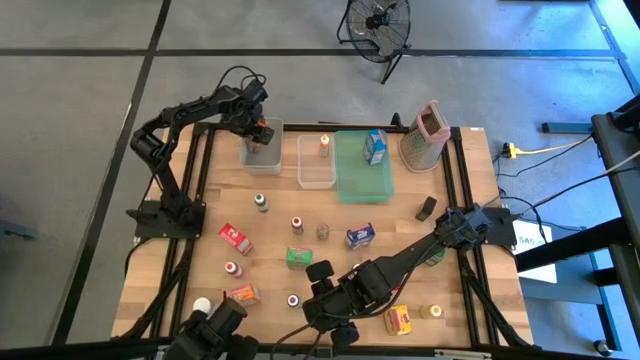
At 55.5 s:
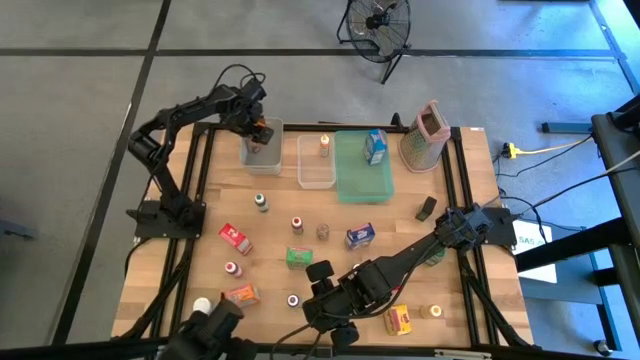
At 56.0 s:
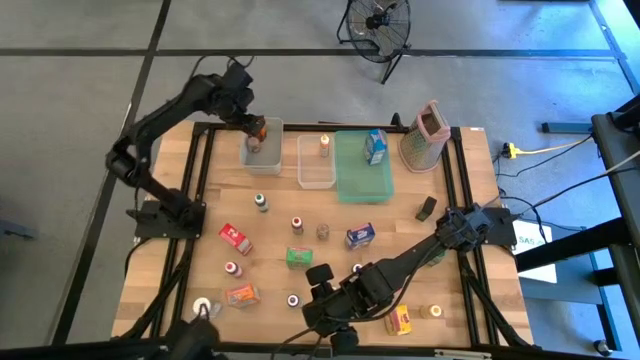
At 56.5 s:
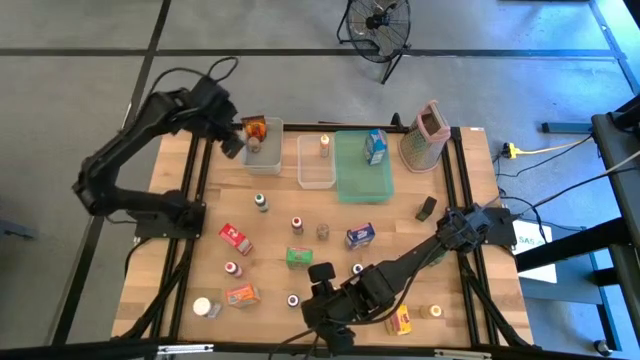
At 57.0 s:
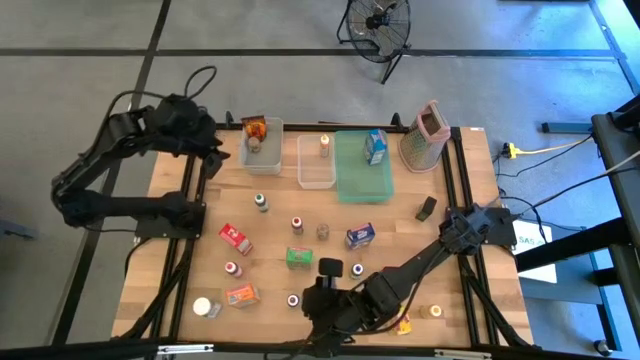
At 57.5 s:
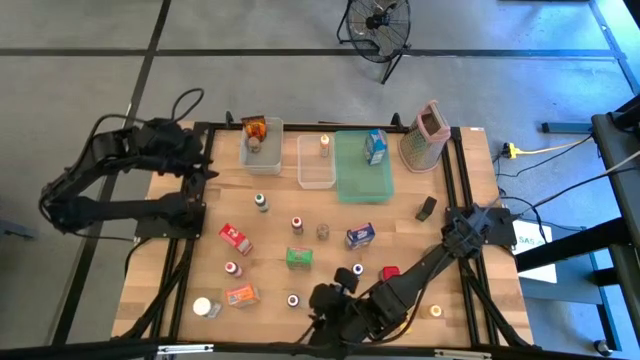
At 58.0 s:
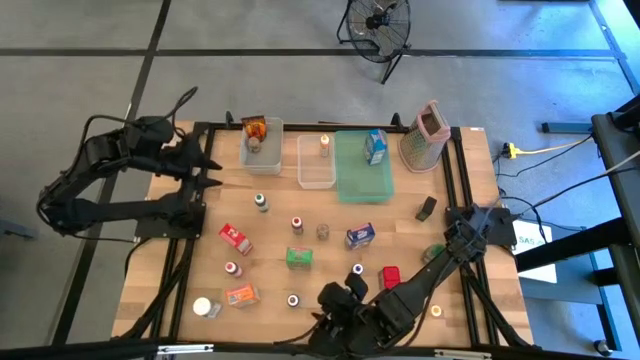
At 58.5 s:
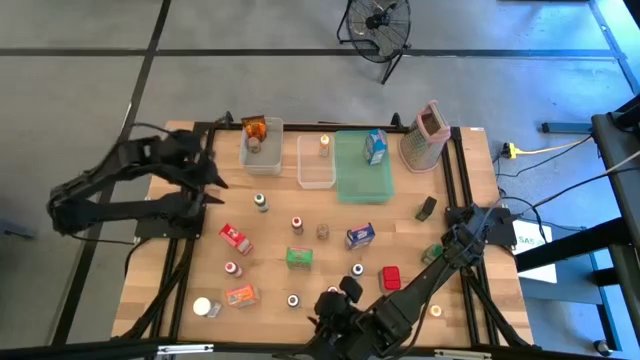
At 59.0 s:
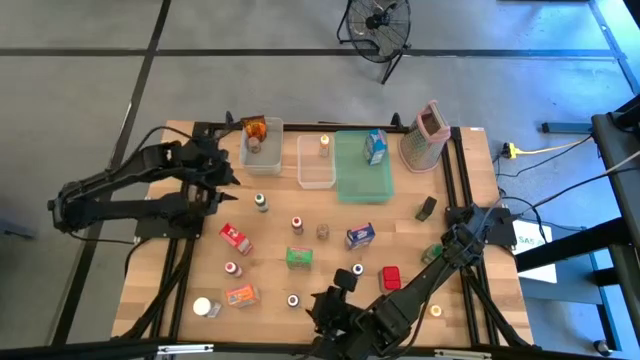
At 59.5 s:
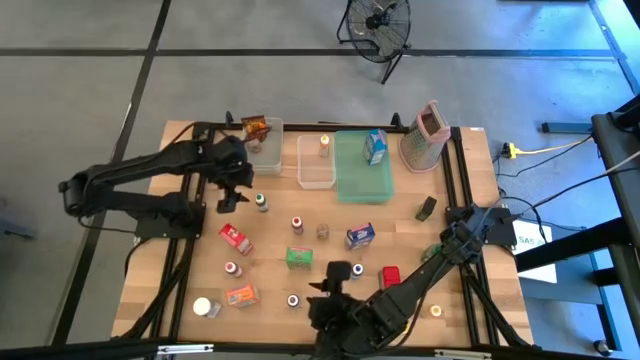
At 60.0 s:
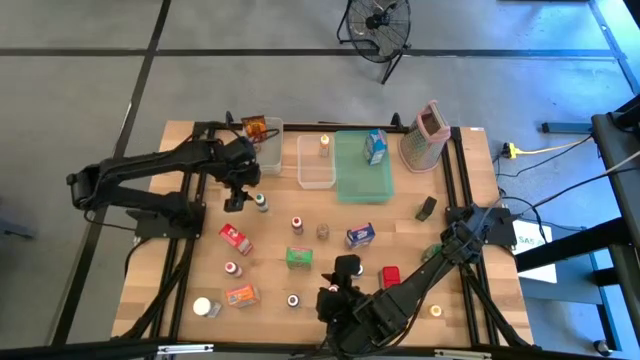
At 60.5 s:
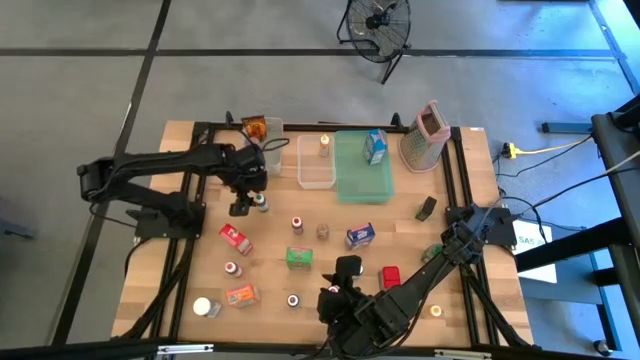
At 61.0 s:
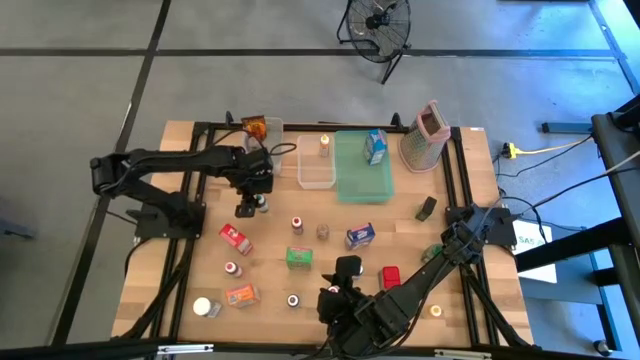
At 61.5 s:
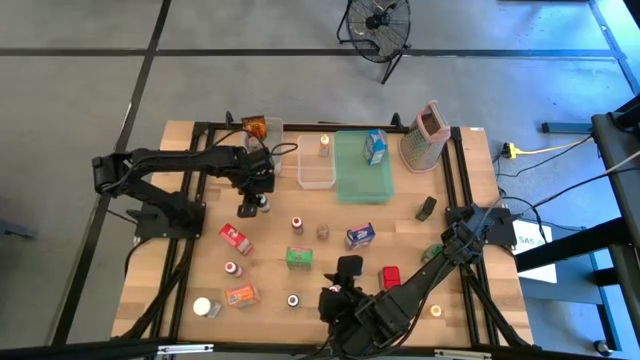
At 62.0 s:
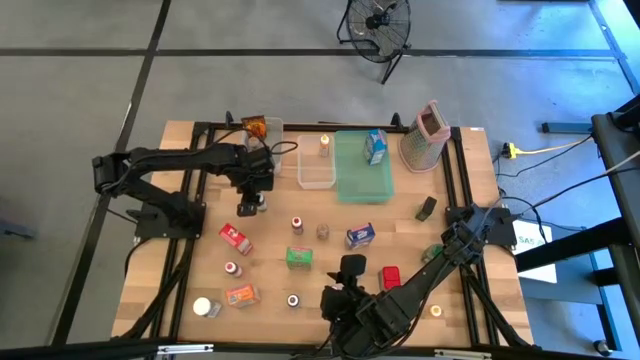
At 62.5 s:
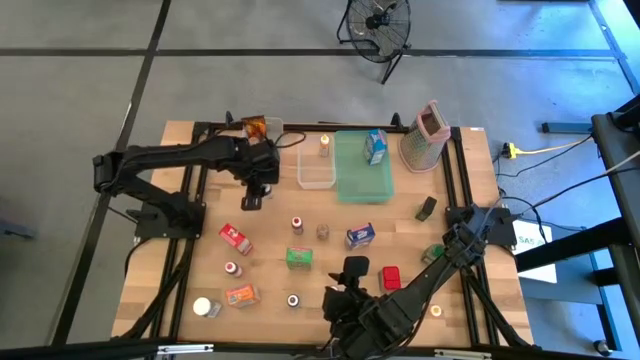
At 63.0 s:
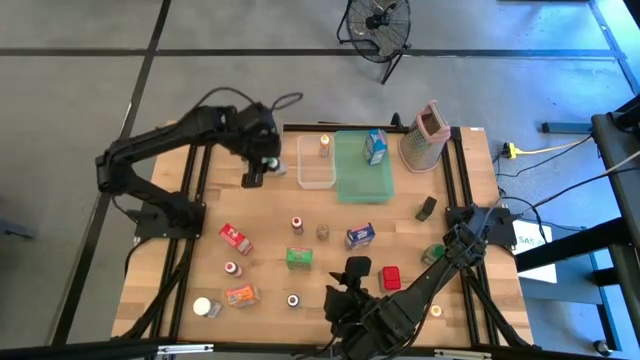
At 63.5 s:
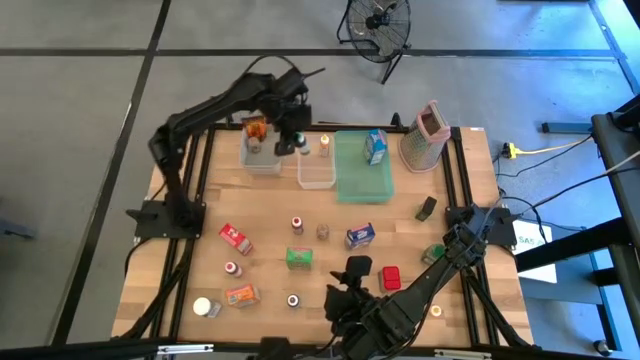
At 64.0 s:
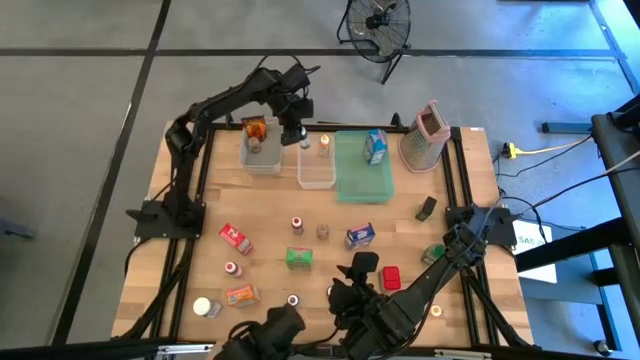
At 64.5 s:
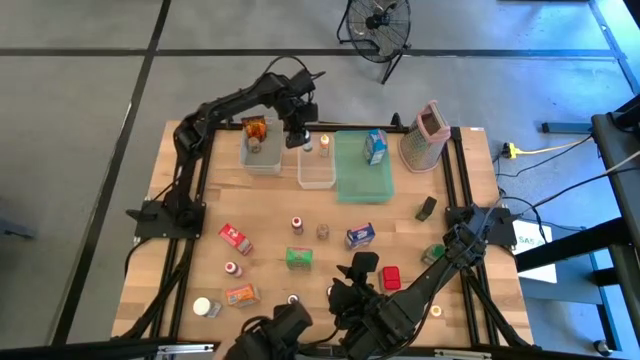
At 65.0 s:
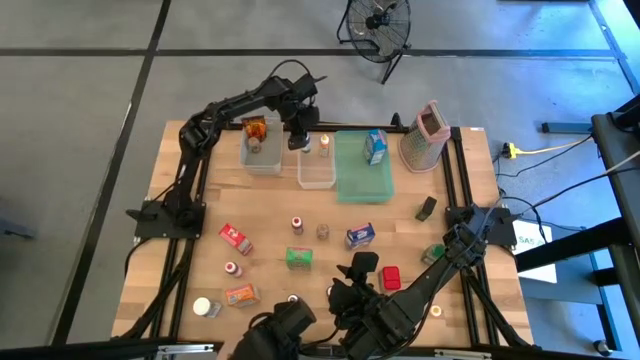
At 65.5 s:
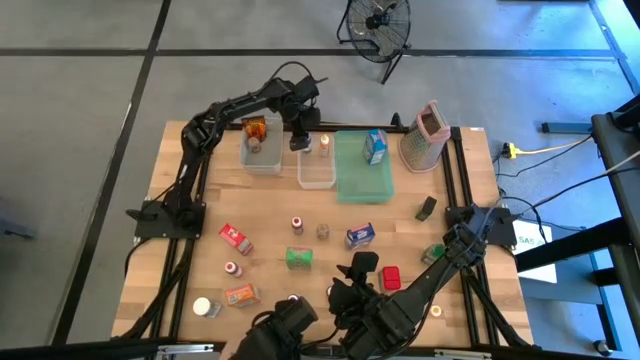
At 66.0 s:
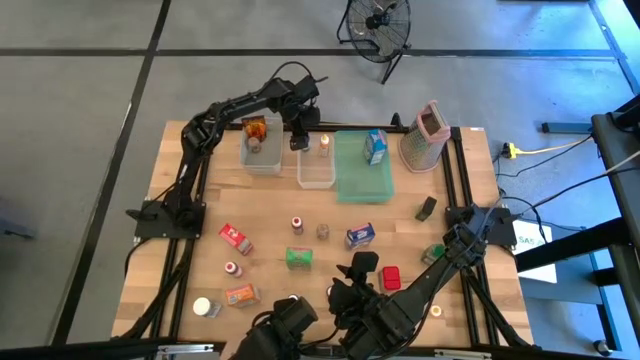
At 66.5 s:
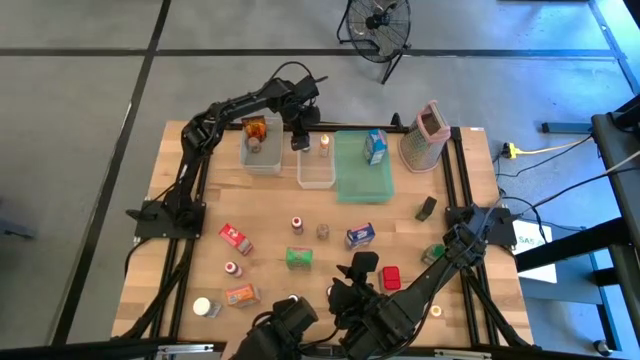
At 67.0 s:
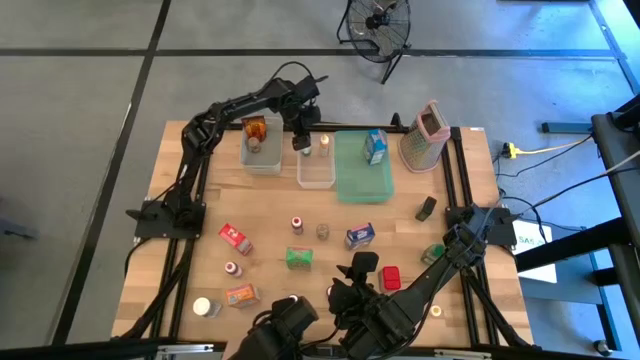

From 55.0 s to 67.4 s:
Task: Pick & Place Kitchen Items
Put the green food coloring bottle into the transparent bin

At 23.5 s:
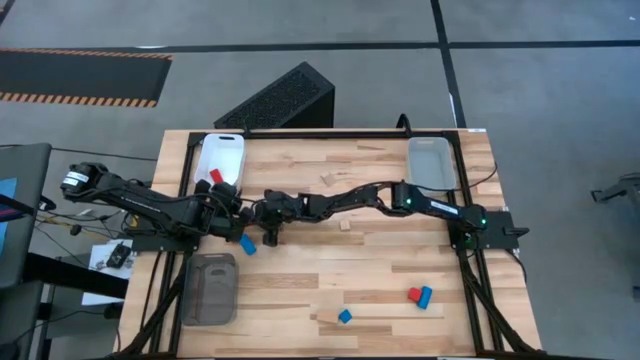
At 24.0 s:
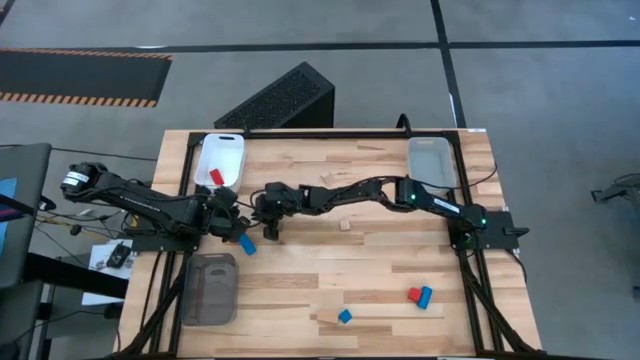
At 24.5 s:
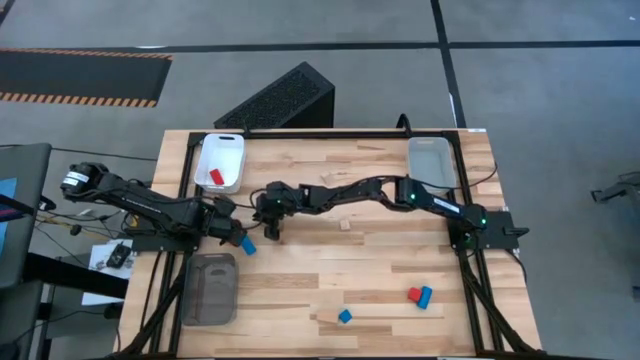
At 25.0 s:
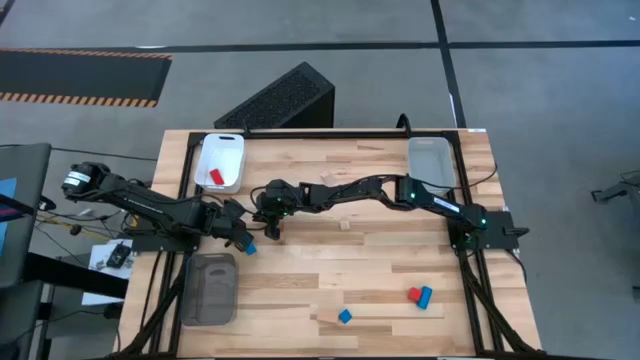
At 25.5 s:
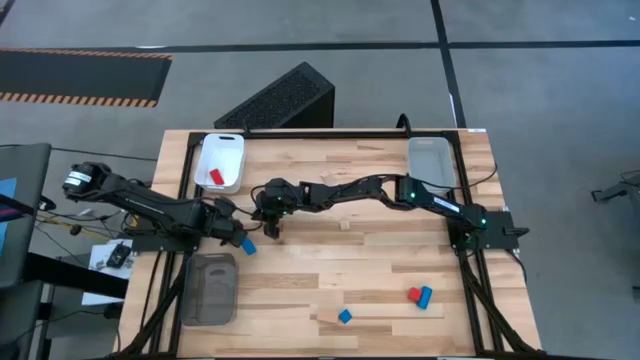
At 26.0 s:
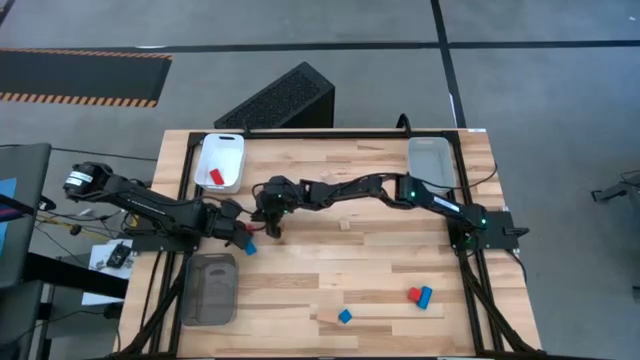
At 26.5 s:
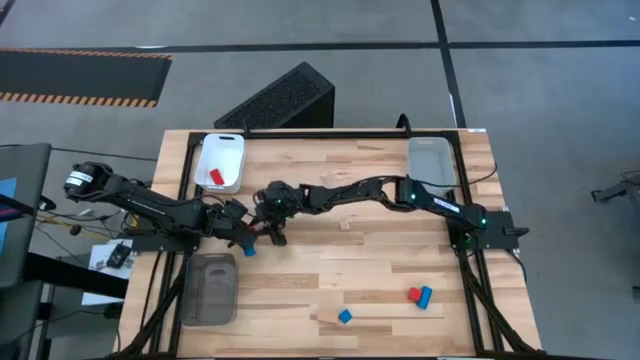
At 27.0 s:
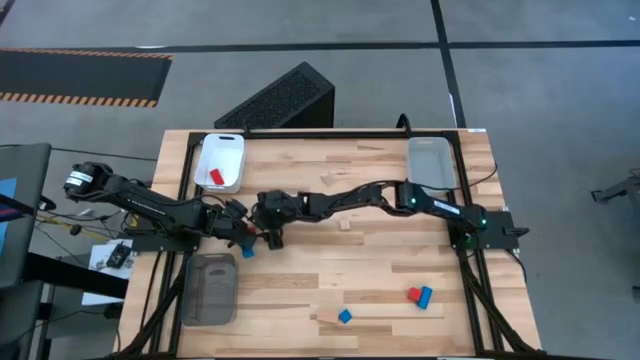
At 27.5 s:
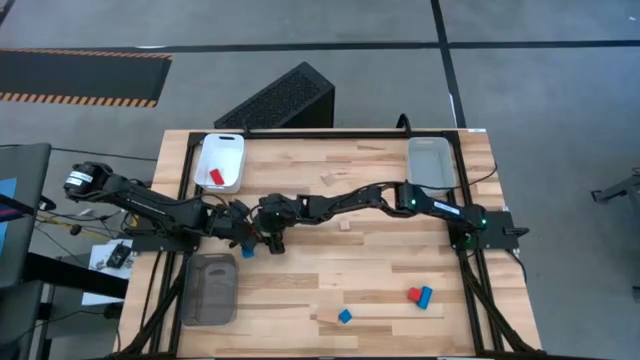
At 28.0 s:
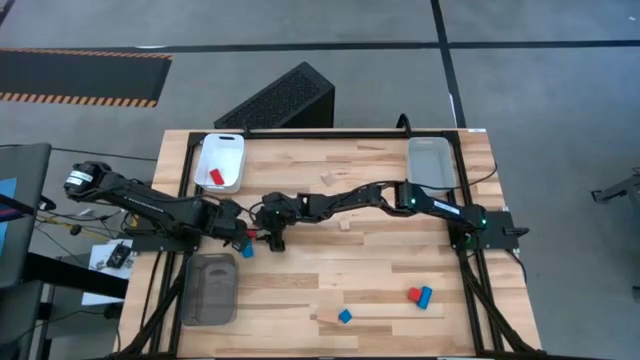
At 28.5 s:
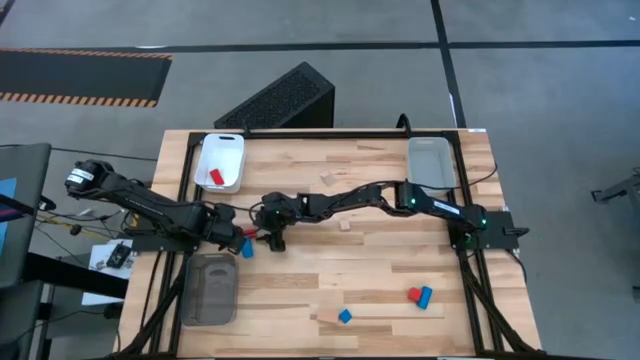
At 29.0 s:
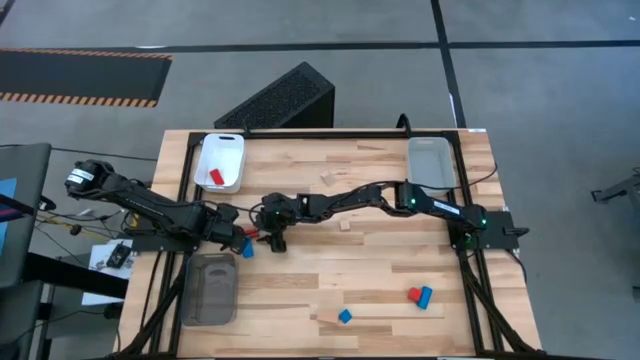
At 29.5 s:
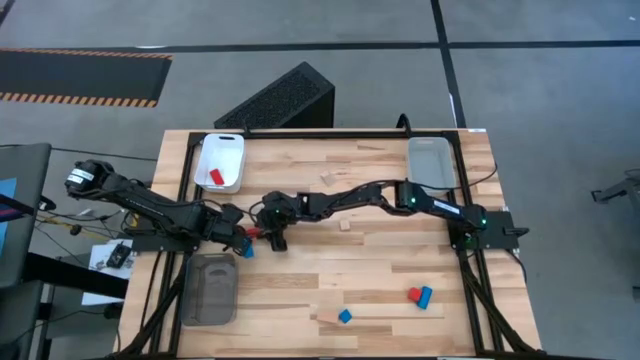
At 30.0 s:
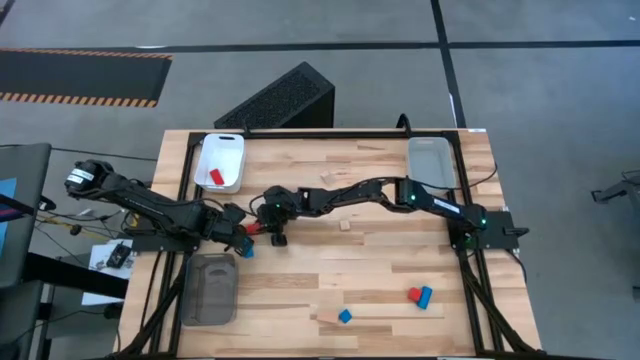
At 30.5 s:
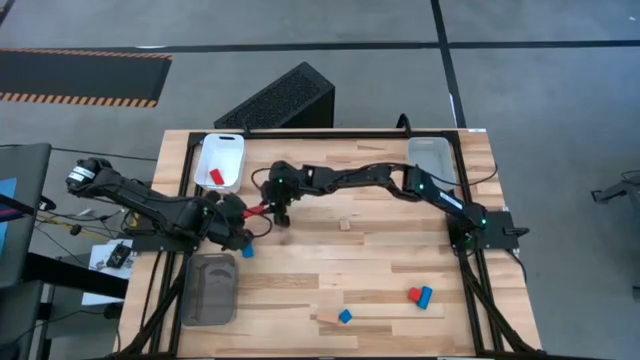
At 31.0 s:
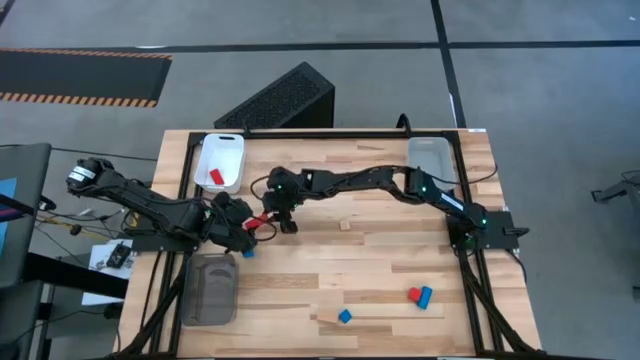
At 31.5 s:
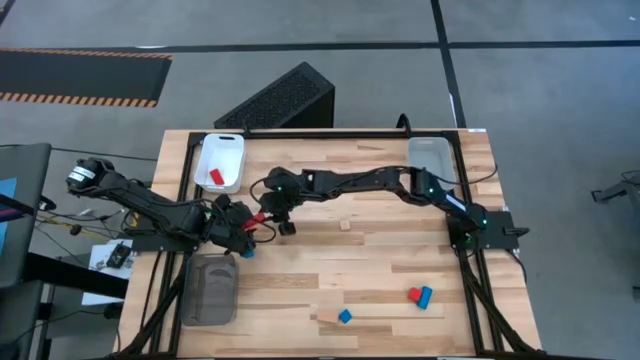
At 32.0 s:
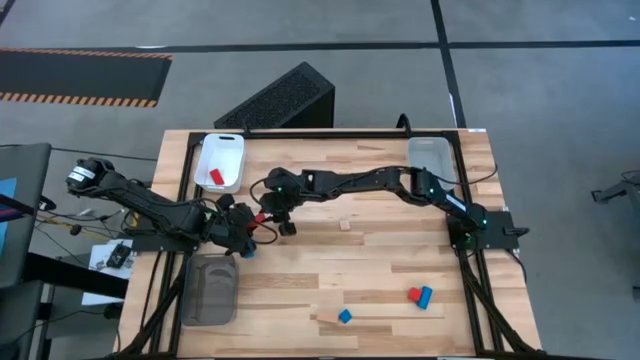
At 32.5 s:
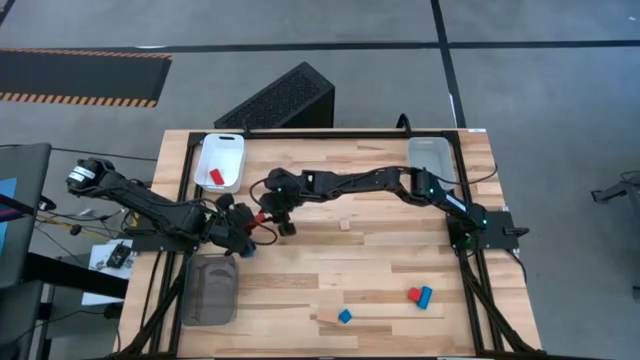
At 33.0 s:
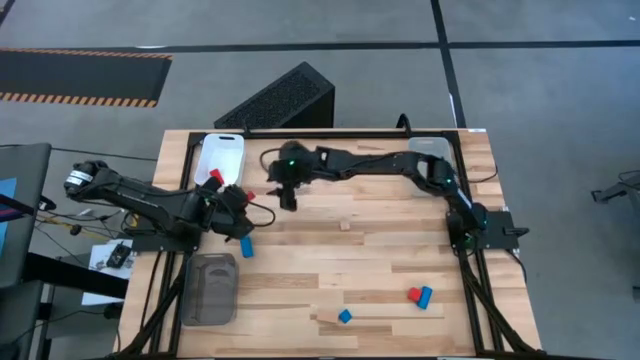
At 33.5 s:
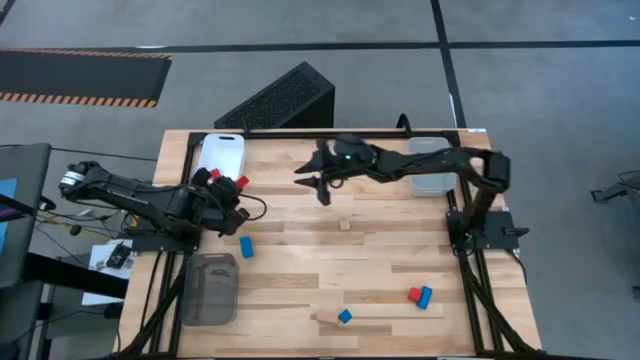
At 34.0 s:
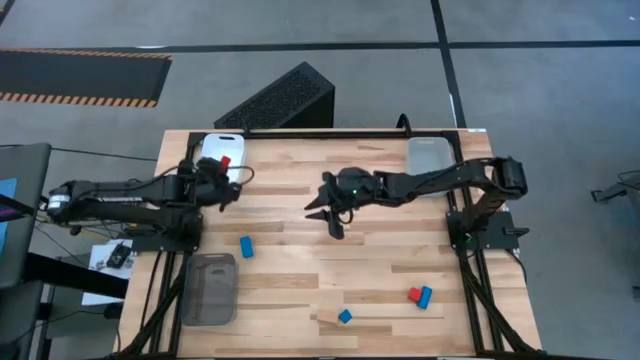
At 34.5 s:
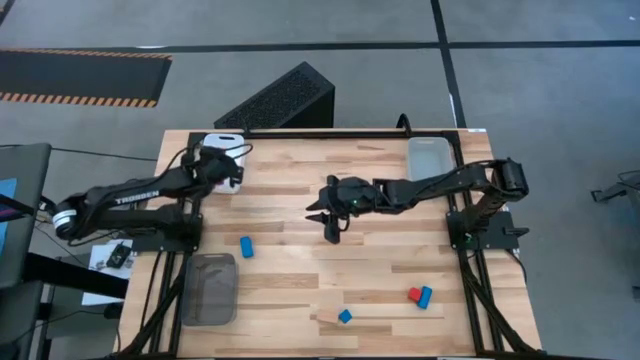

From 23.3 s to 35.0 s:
Task: Sort & place blocks by color
Put the top red block into the white bin
